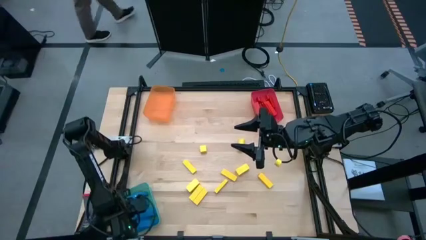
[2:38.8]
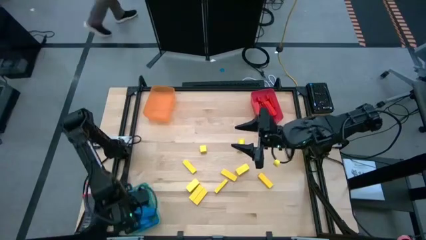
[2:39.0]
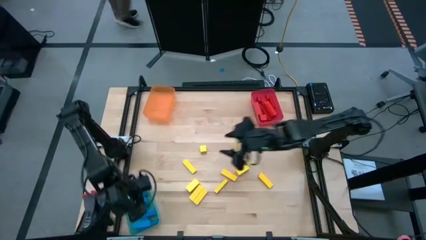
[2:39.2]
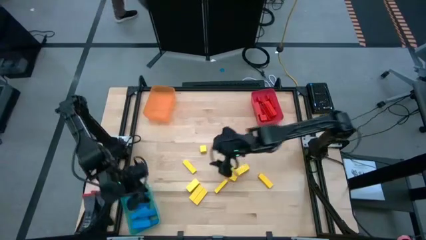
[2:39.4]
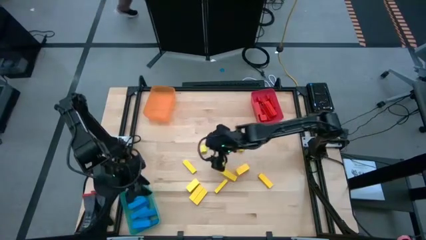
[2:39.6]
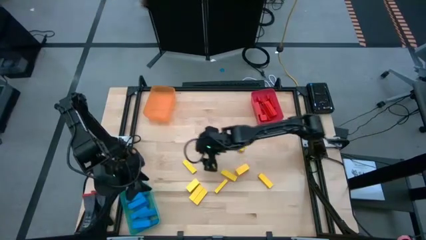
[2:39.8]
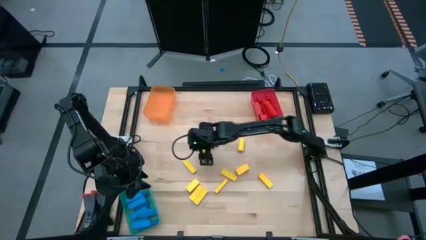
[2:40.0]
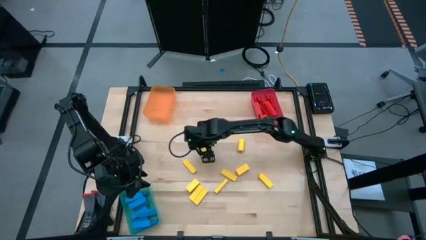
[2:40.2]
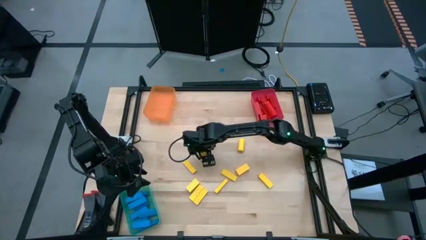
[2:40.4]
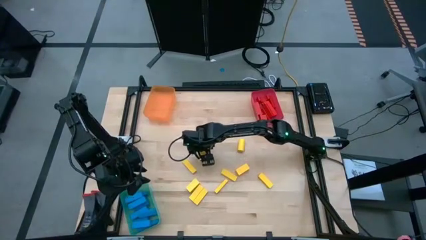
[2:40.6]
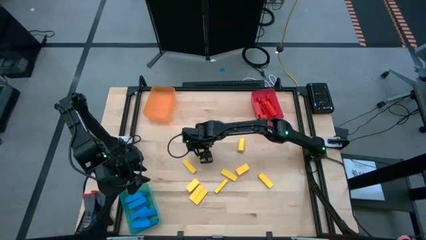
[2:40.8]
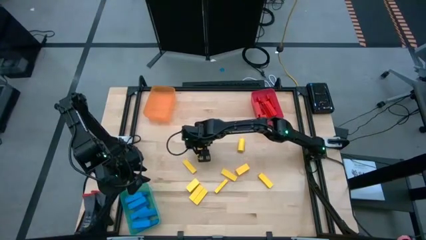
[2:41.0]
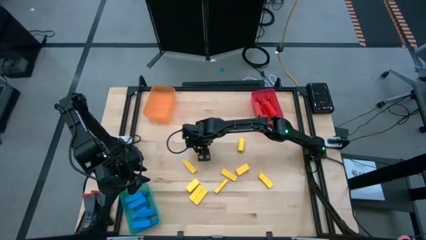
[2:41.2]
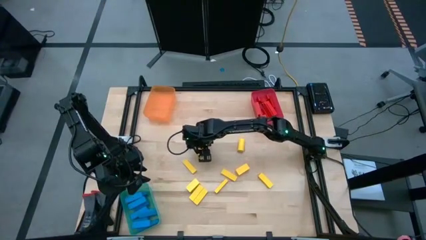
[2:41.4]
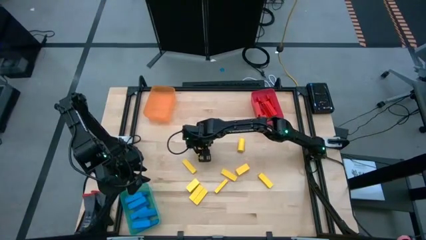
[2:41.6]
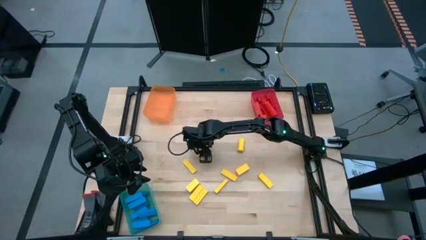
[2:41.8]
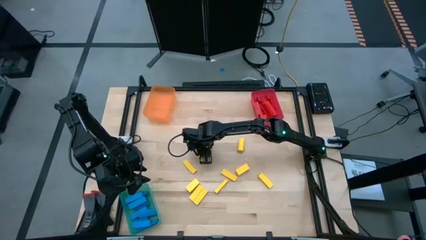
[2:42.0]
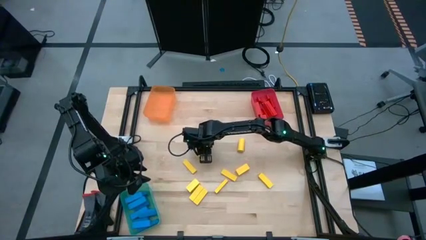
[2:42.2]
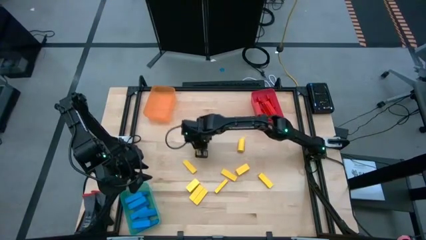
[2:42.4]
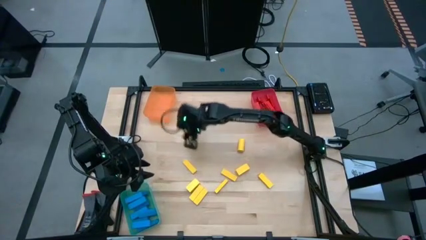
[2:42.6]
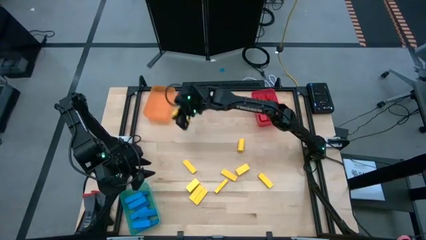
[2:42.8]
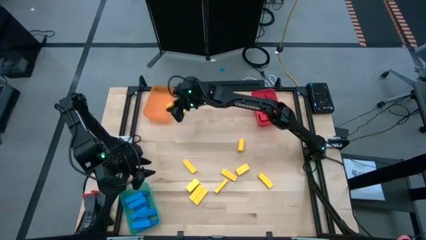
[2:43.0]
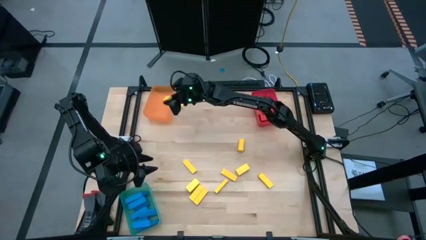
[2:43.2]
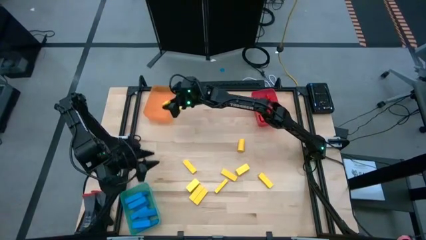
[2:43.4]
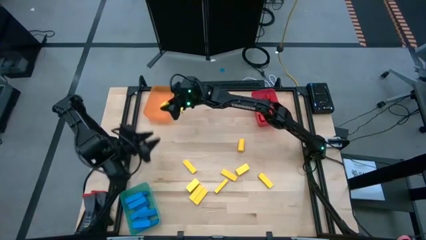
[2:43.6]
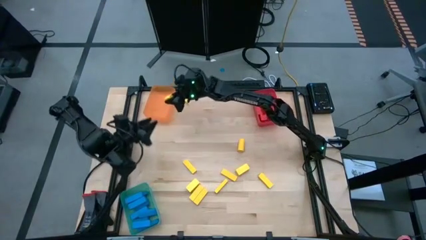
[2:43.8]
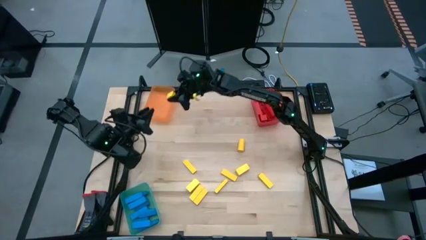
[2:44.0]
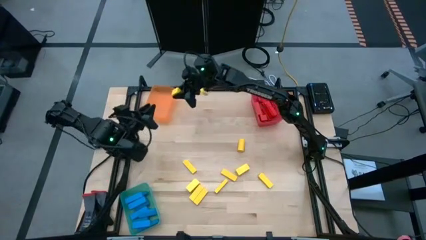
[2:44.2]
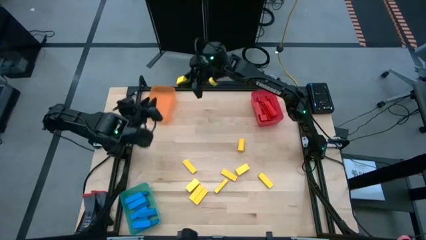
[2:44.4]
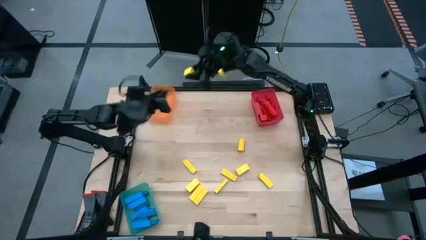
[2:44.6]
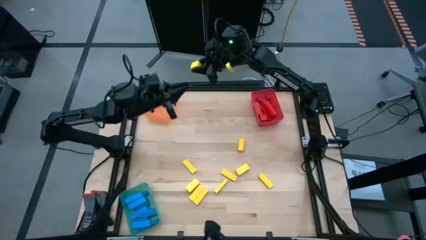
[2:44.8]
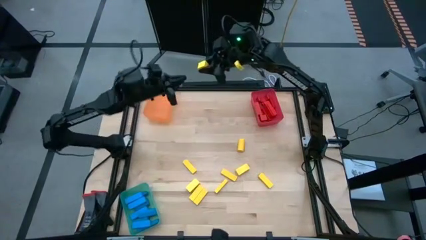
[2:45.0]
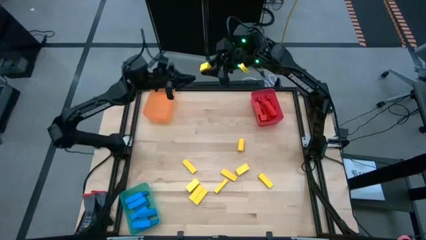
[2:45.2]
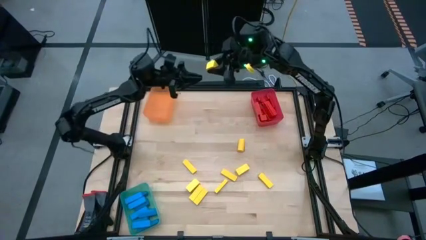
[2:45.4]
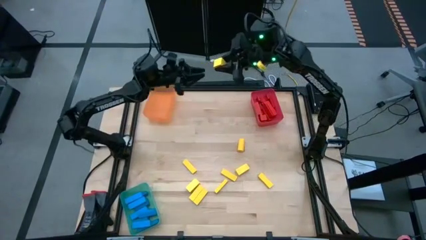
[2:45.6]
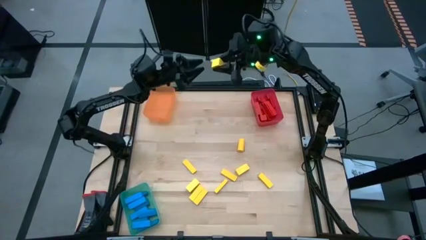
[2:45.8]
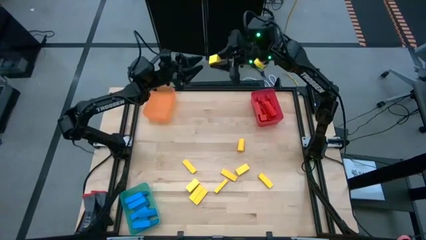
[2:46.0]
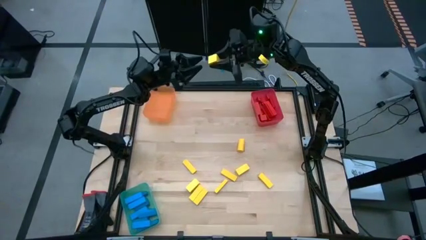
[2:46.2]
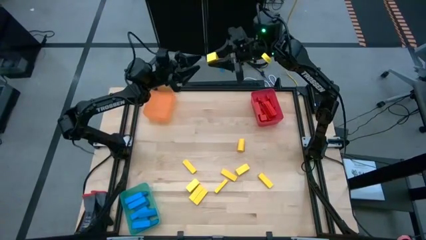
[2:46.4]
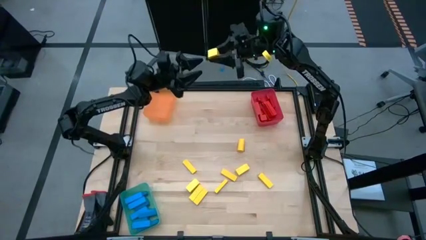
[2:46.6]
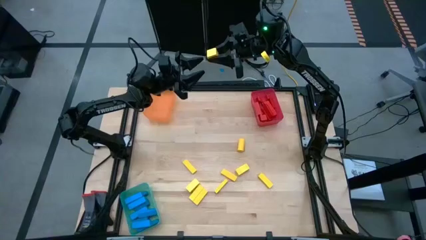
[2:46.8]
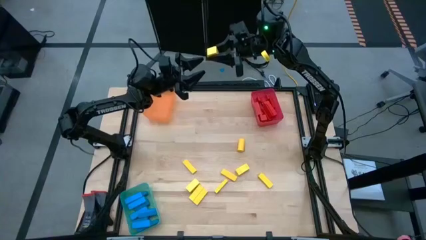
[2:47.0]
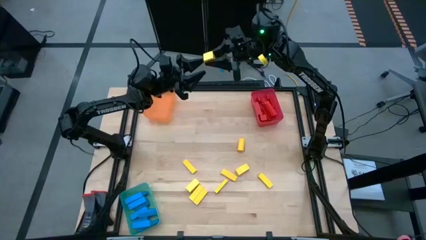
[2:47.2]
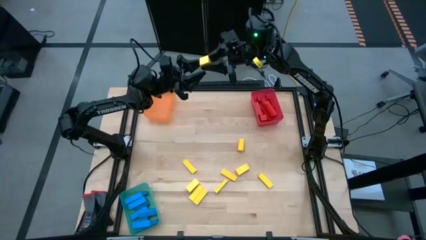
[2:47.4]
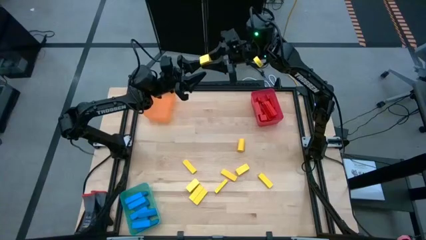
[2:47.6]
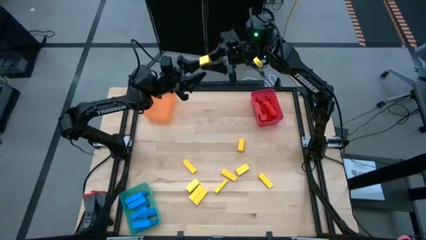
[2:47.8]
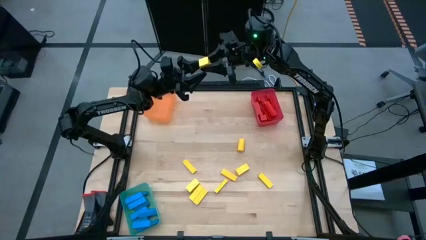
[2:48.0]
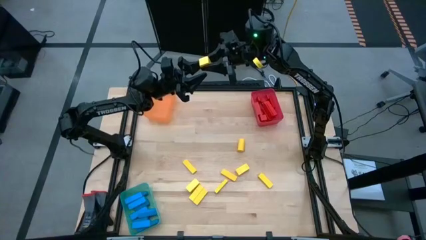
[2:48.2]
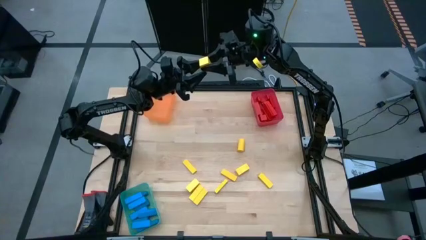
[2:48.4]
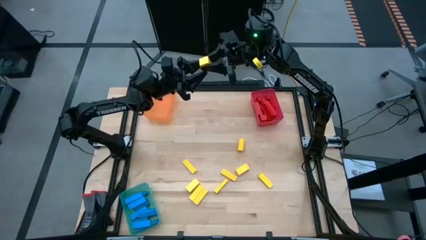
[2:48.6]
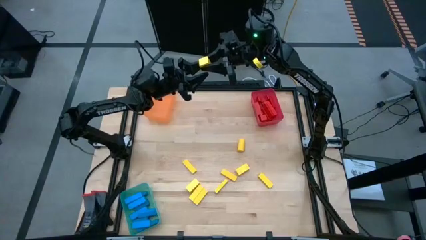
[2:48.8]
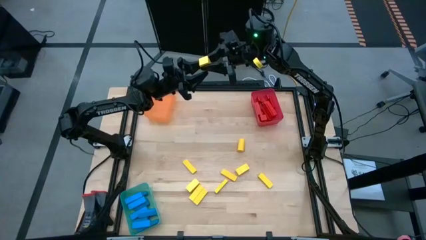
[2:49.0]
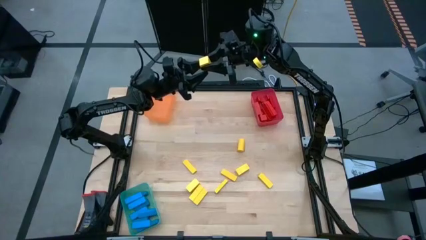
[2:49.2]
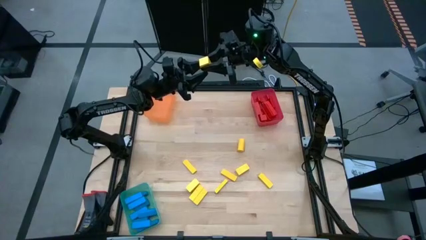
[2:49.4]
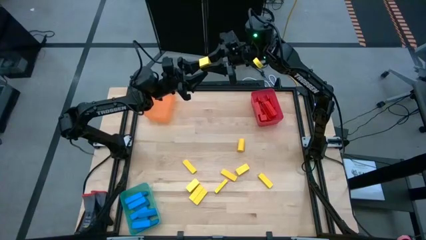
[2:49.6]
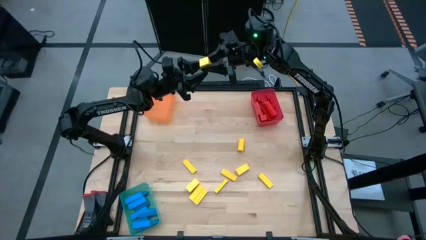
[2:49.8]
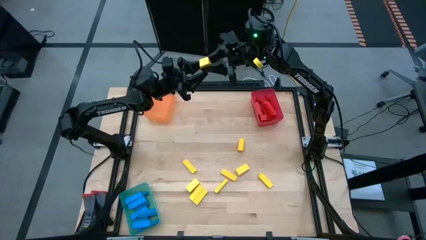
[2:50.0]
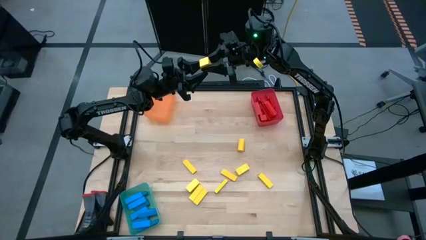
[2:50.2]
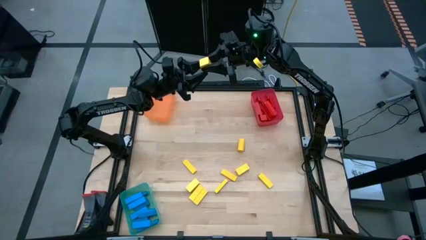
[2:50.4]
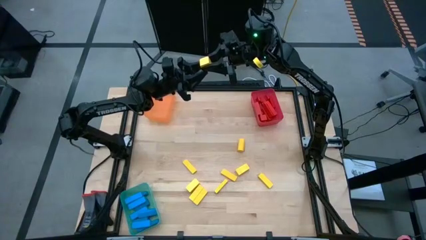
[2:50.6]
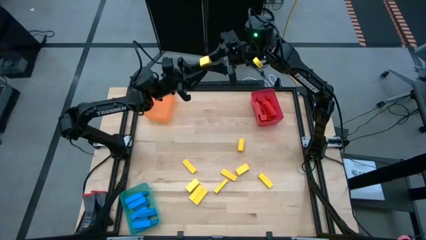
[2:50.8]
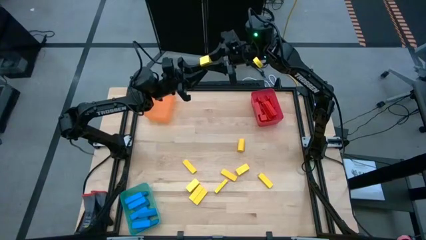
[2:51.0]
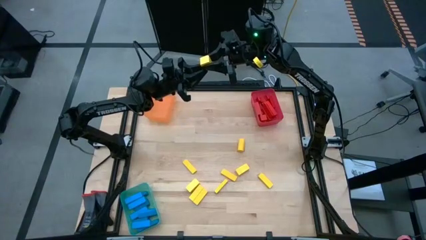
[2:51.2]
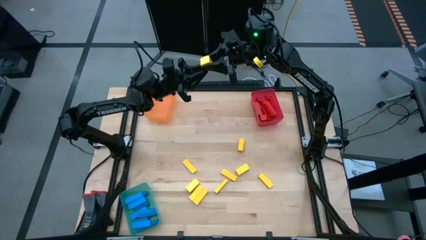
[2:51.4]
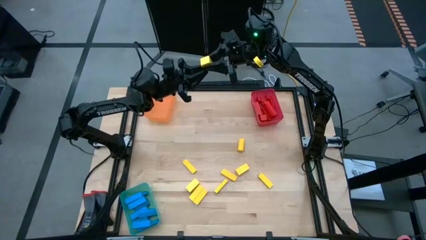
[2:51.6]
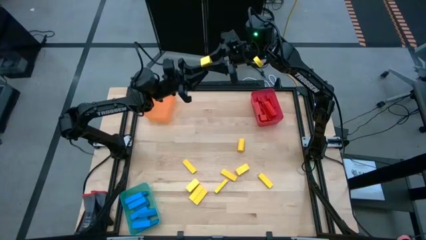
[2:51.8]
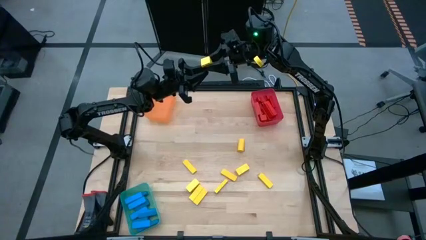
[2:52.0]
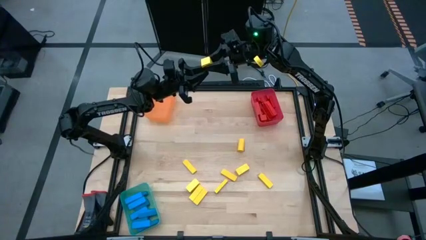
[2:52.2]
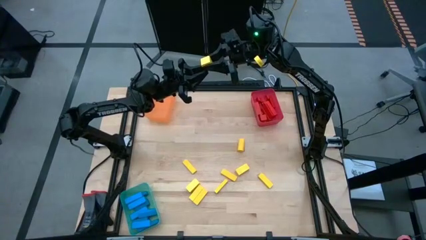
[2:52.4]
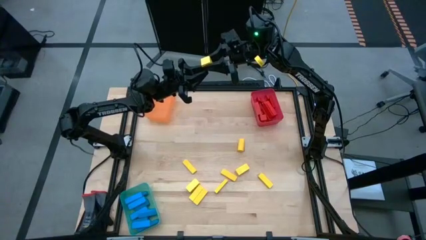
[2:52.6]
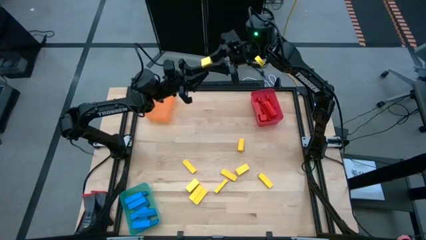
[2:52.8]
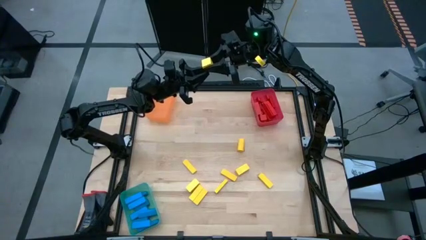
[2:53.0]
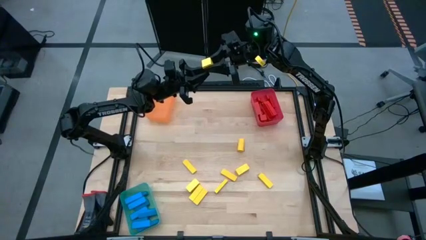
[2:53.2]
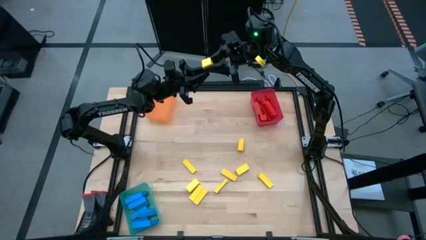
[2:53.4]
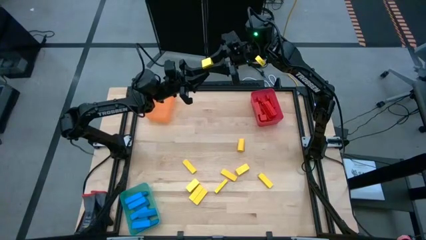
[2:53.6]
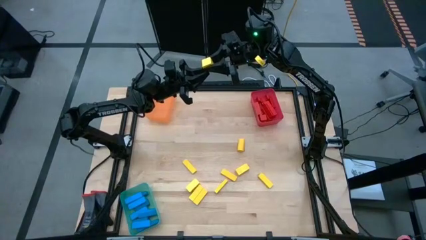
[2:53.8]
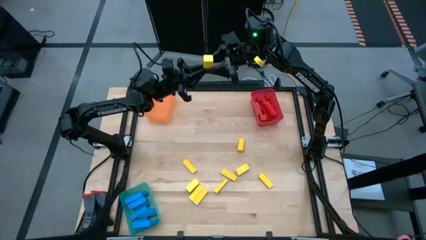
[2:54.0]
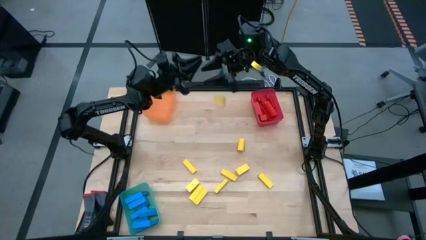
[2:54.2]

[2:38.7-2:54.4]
Task: Sort blocks
Put the yellow block into the orange transparent bin
